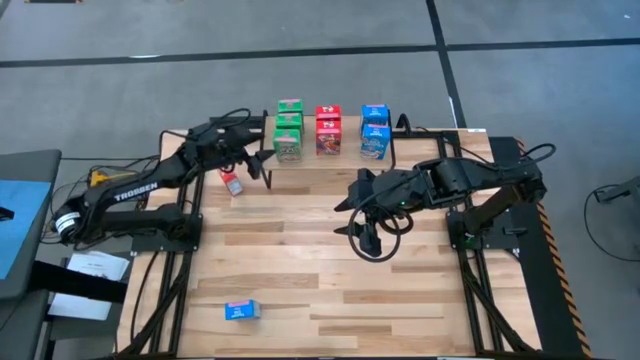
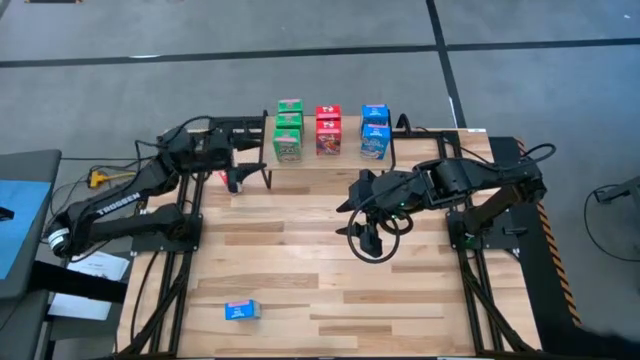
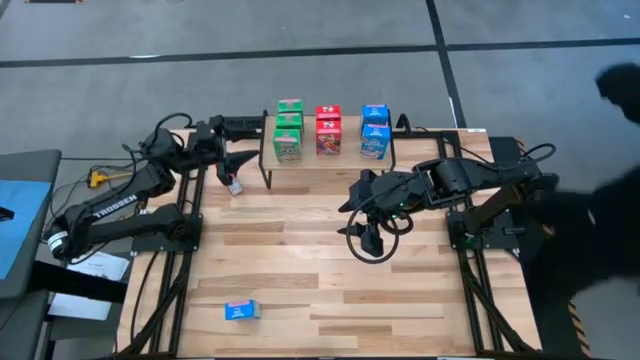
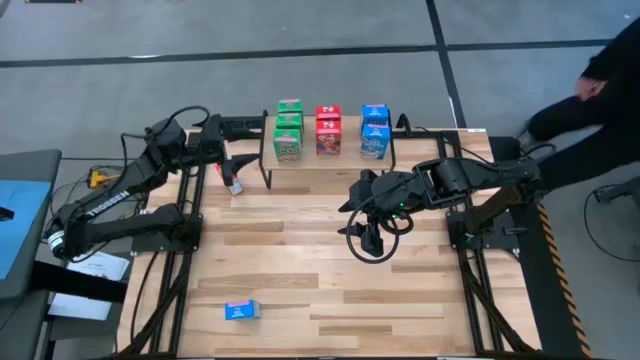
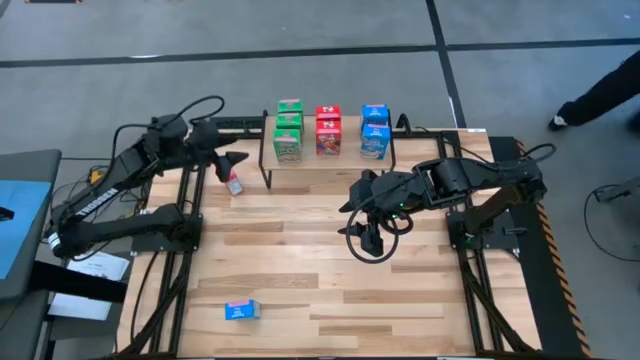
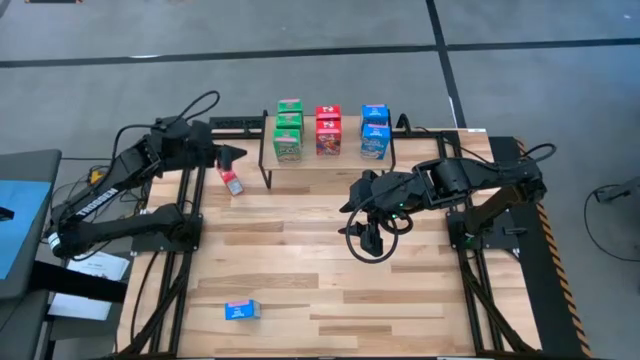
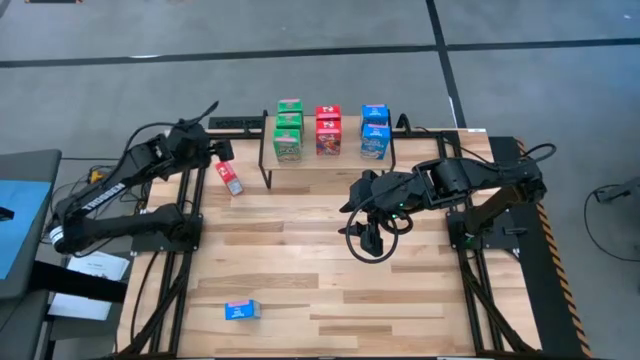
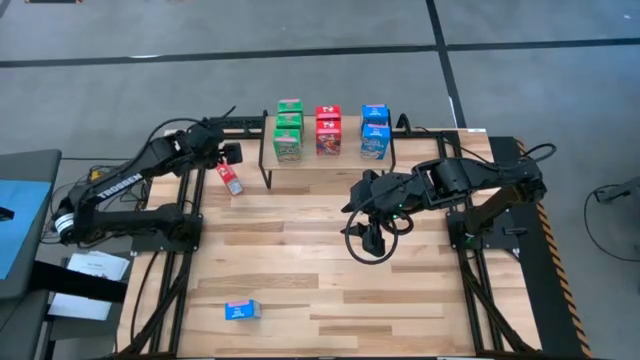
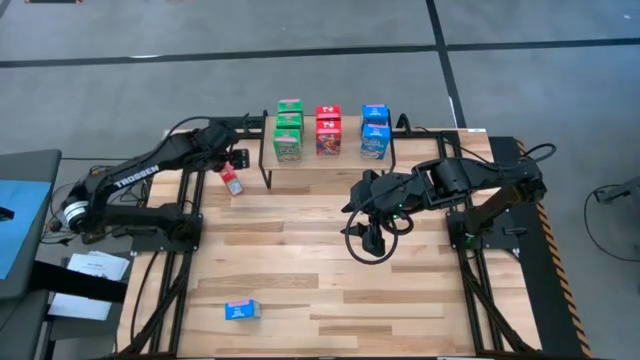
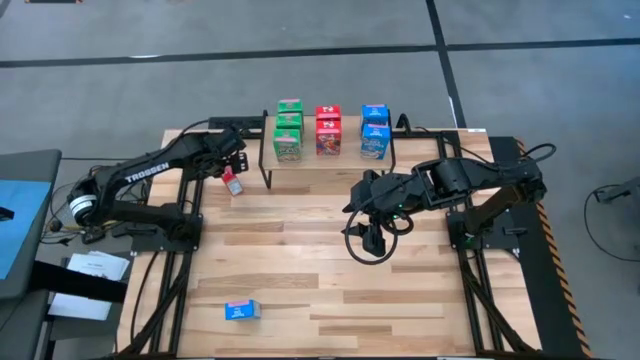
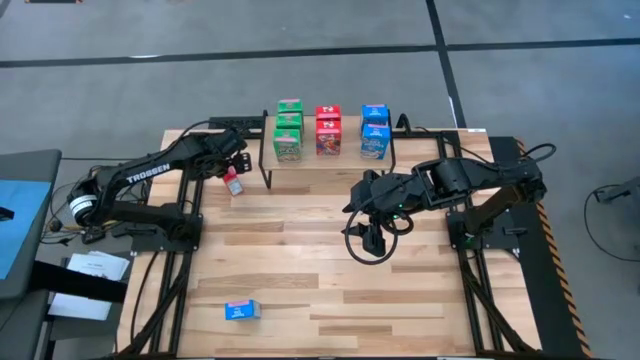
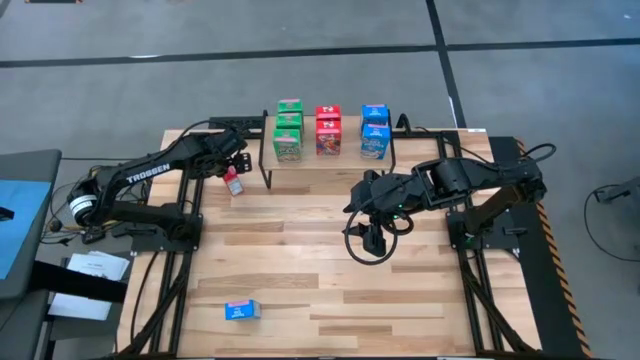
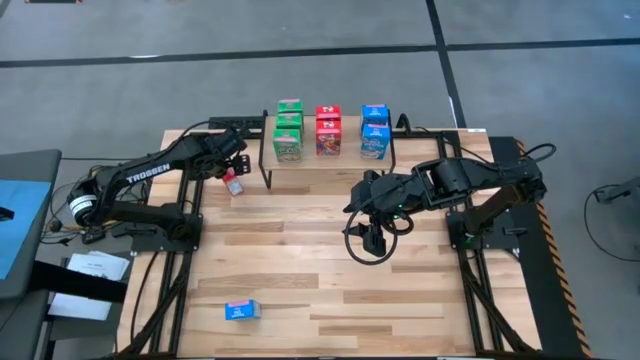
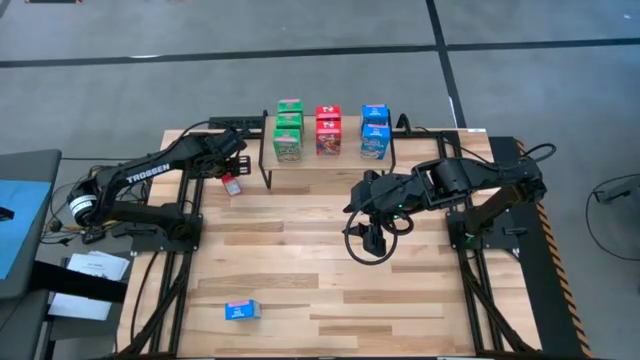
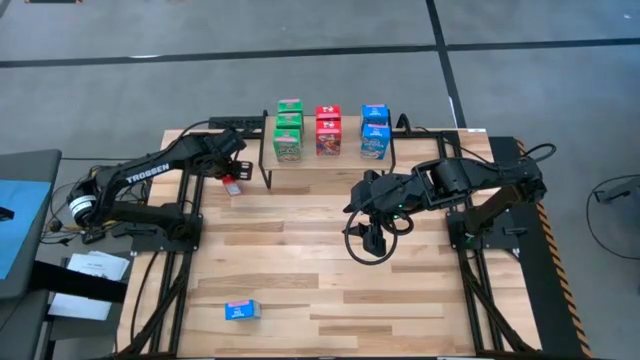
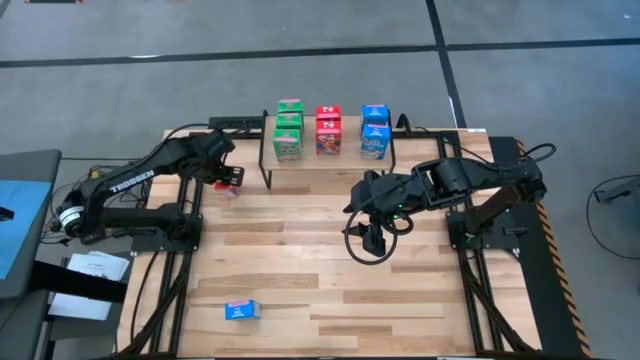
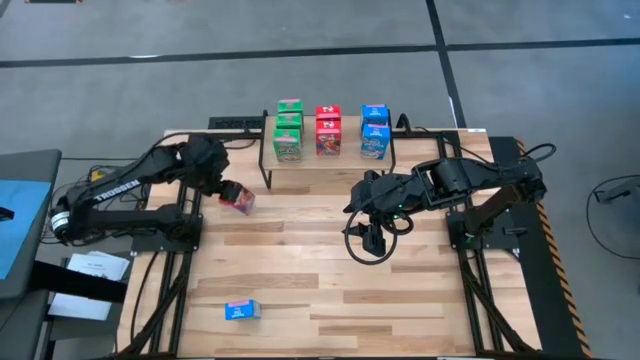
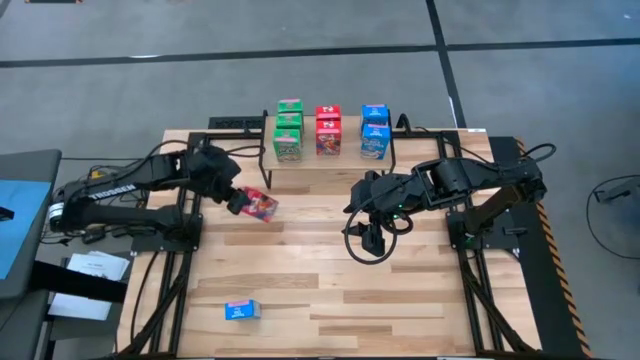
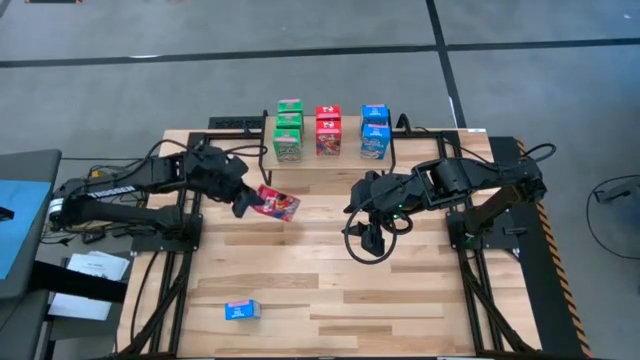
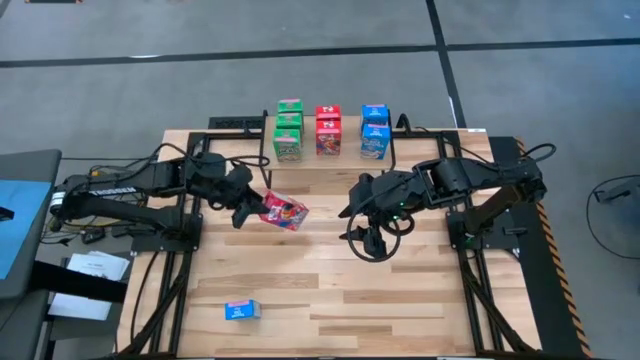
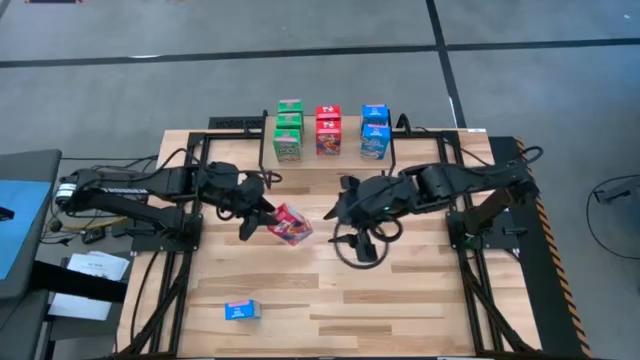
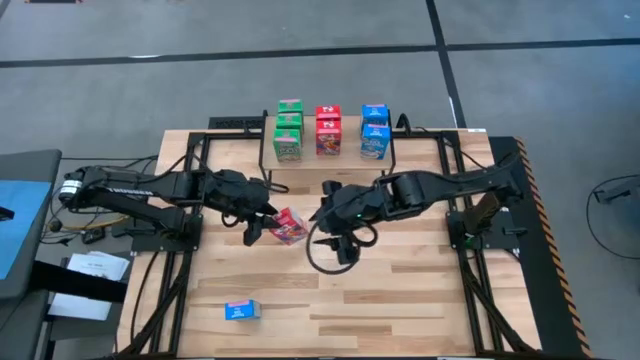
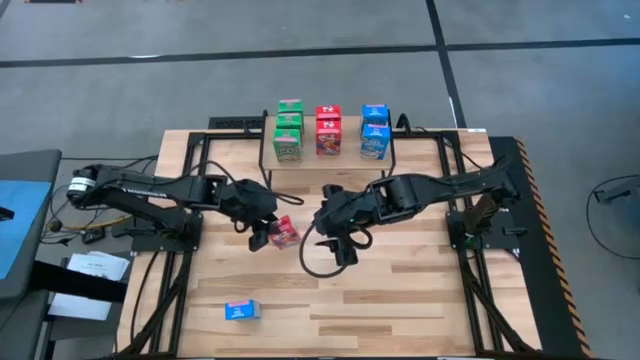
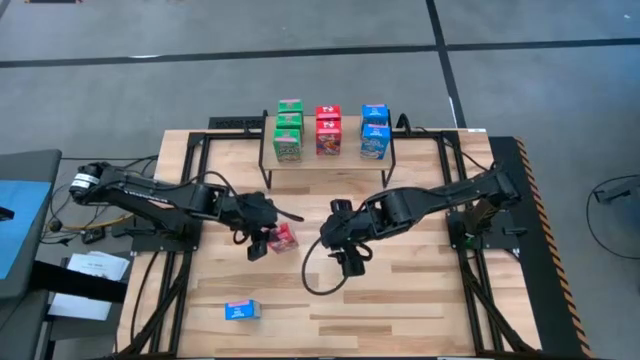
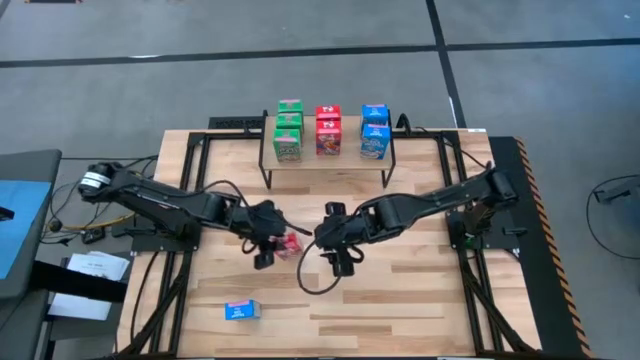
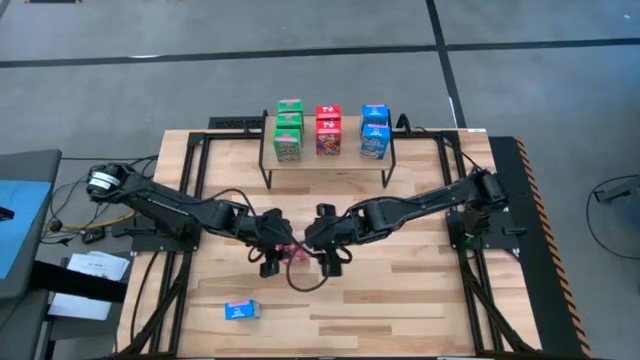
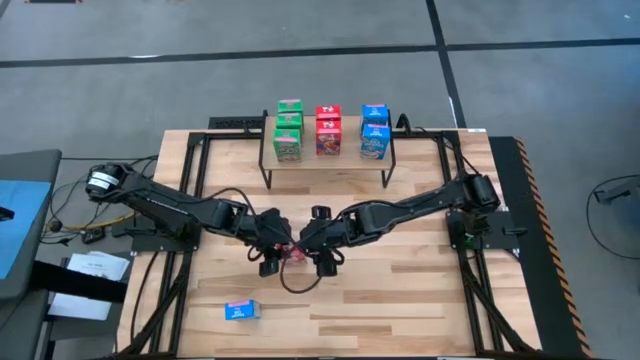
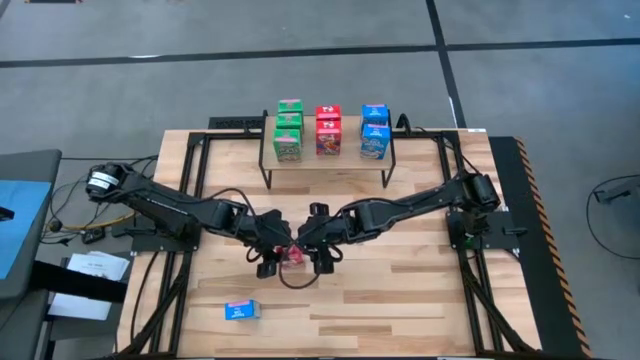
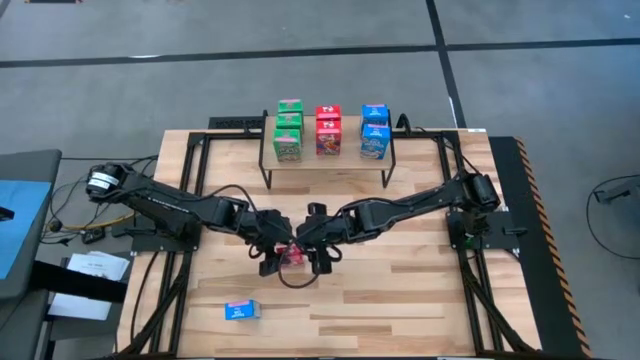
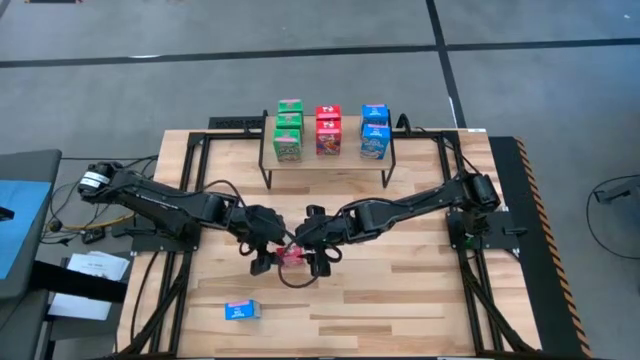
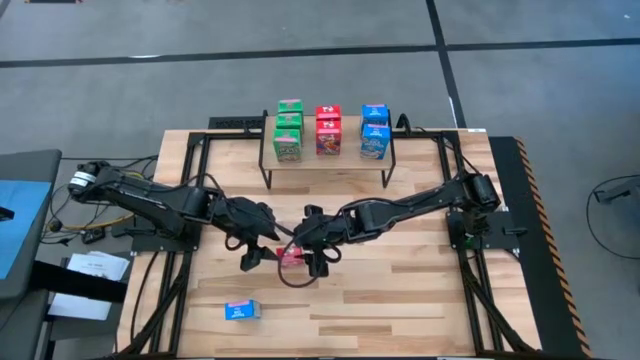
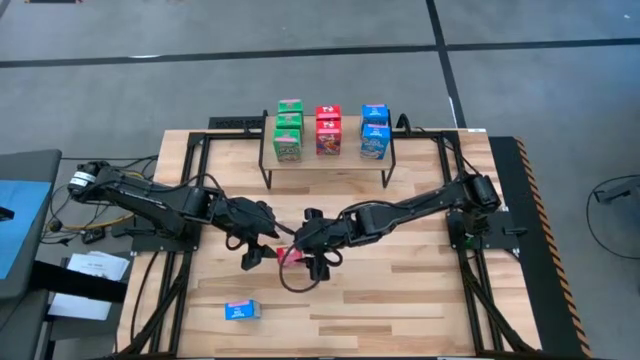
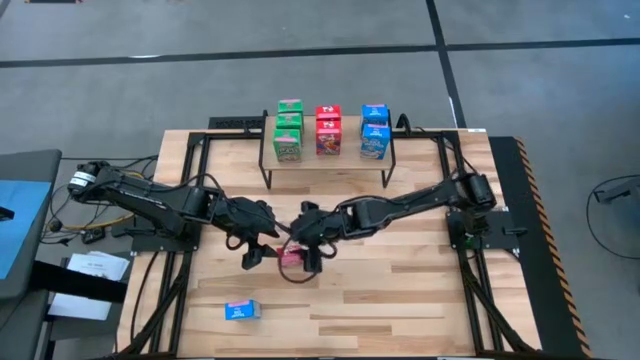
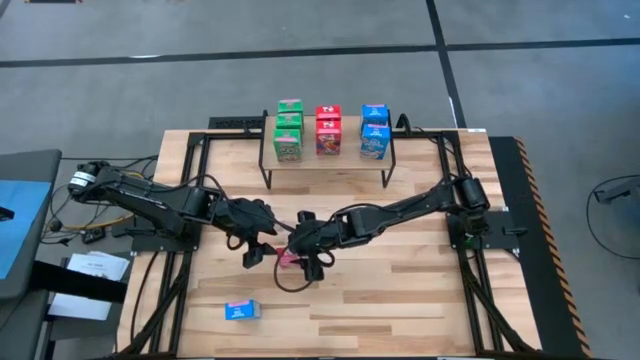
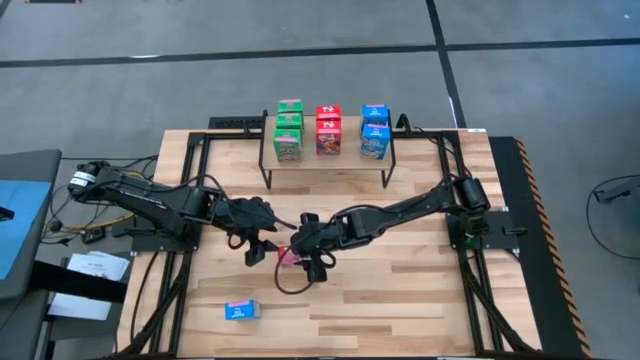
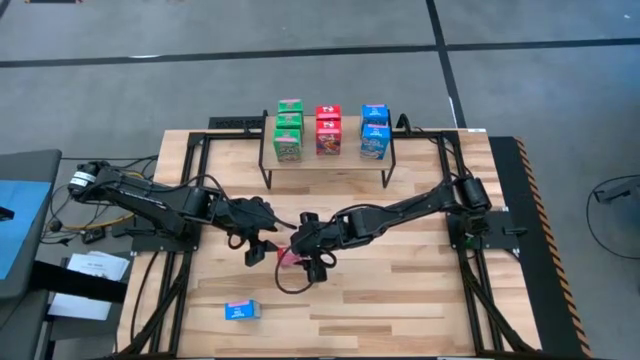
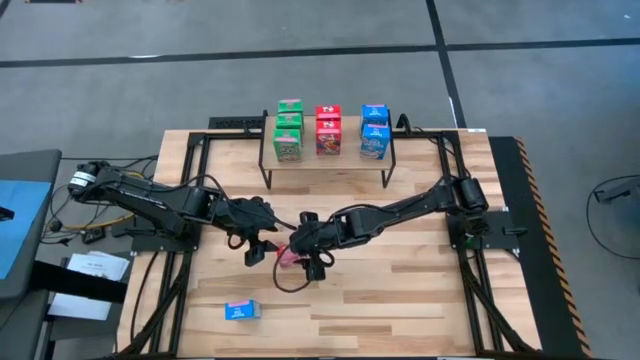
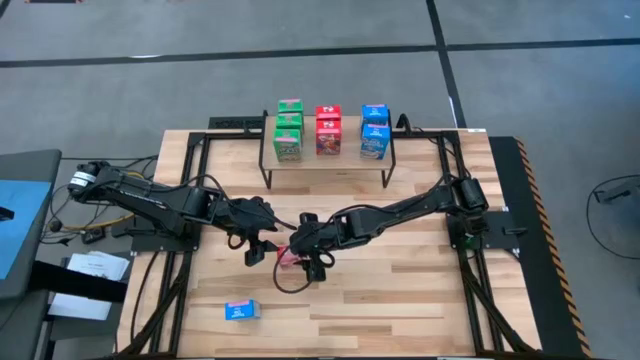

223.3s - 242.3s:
Task: Stack cereal on shelf
Put the red cereal box on the shelf aligned with the other red cereal boxes

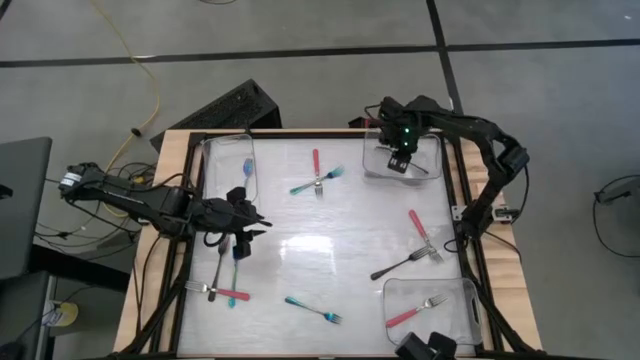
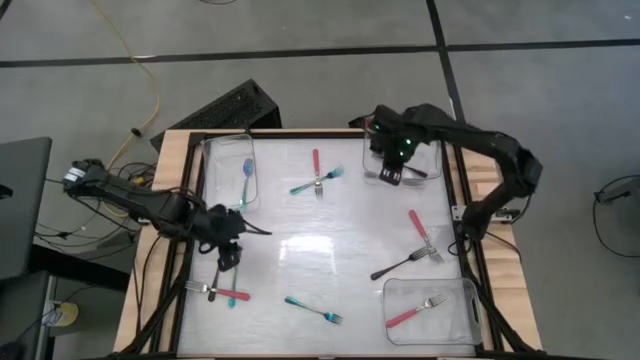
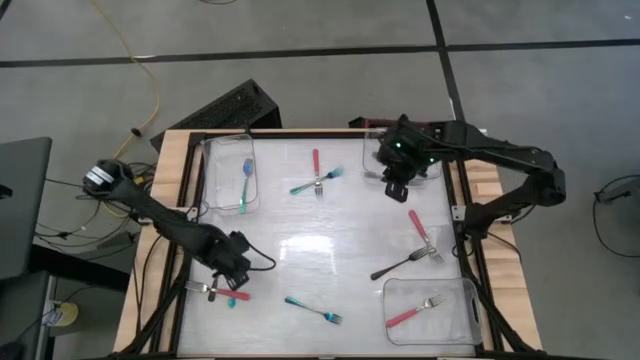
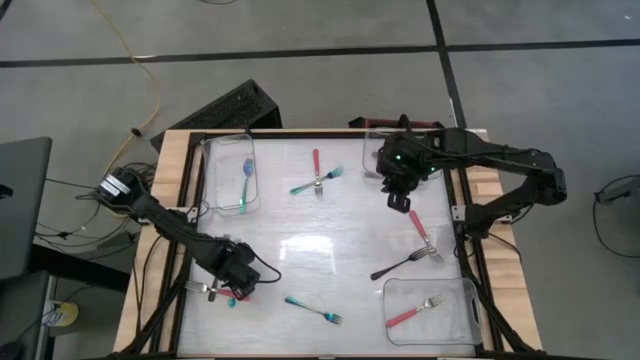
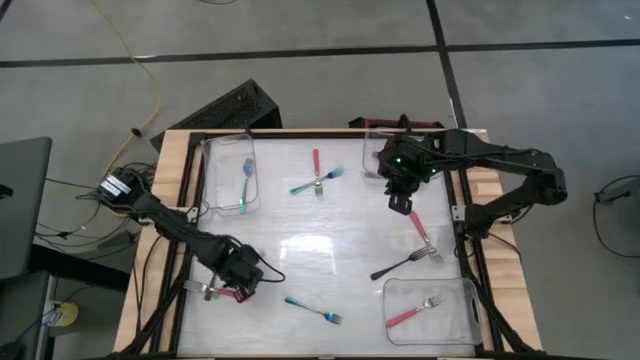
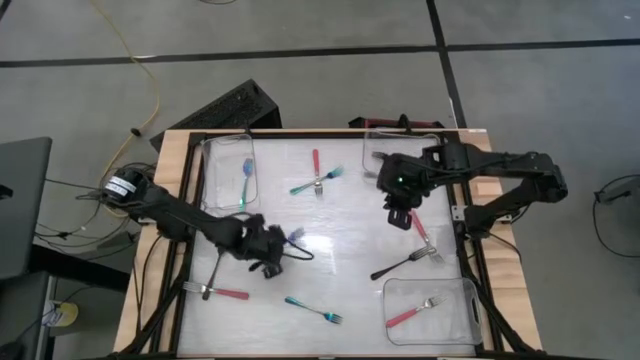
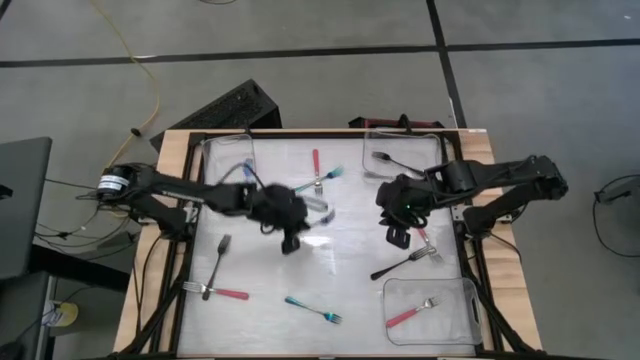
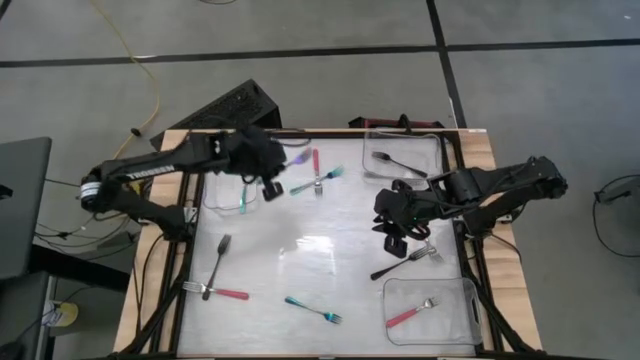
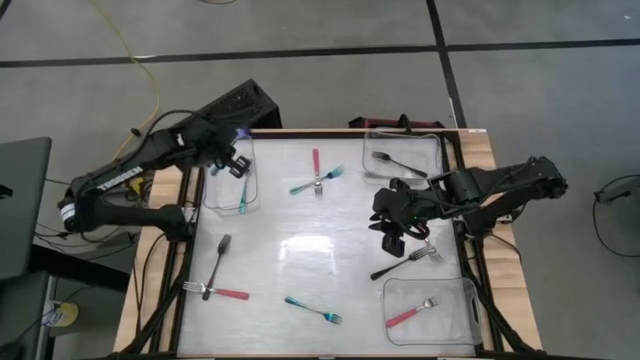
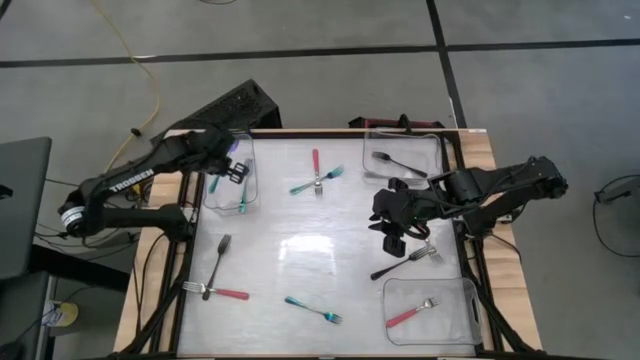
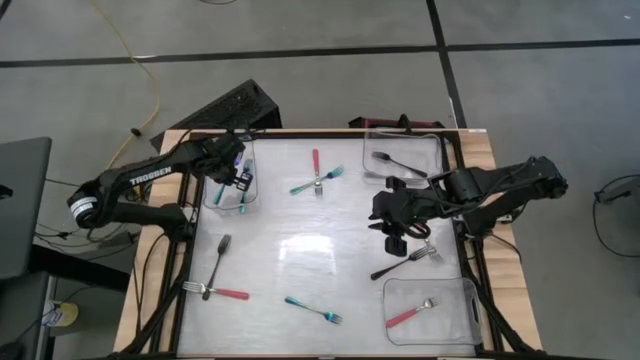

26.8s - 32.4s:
Task: Sort silverware by color (type)
Put the blue fork into the left transparent bin
